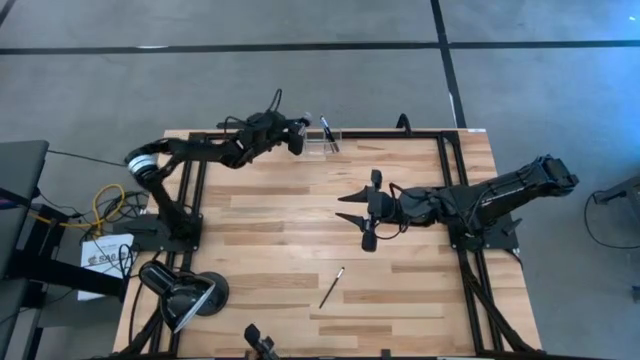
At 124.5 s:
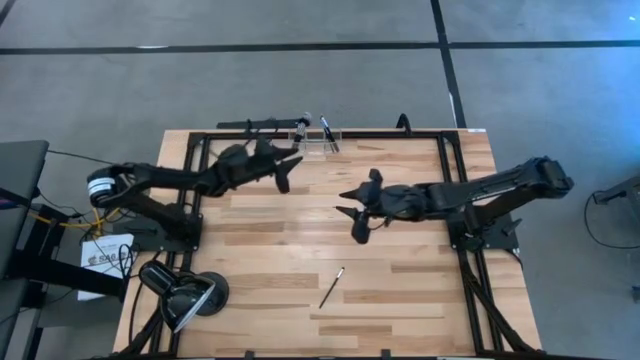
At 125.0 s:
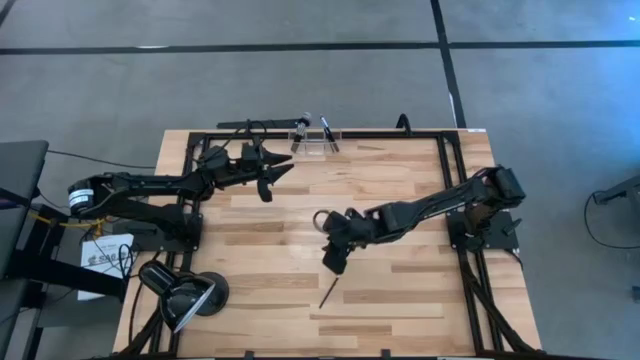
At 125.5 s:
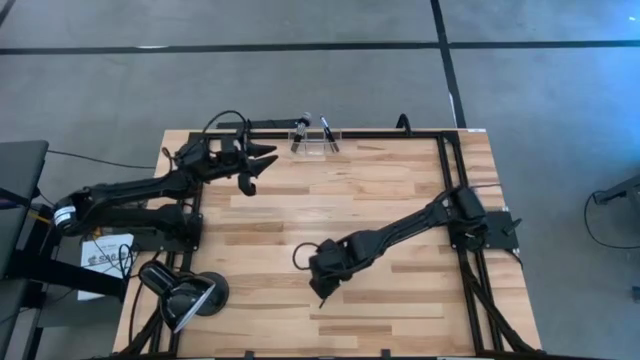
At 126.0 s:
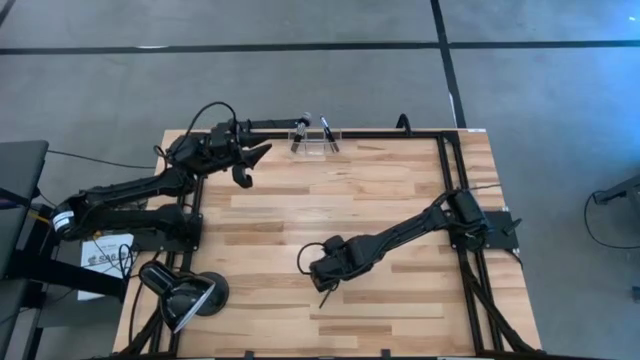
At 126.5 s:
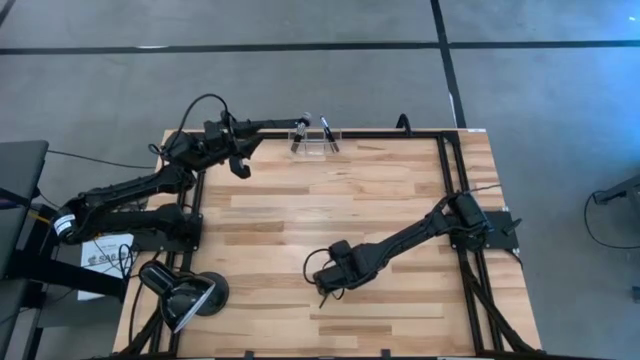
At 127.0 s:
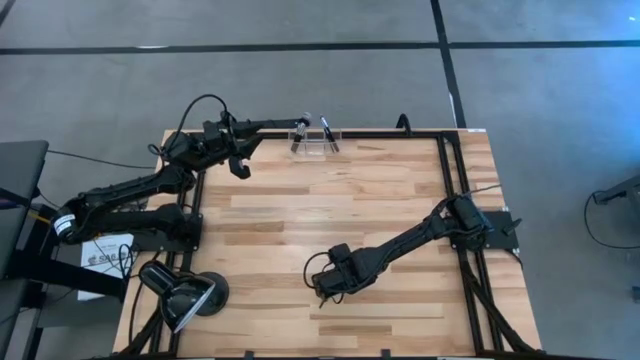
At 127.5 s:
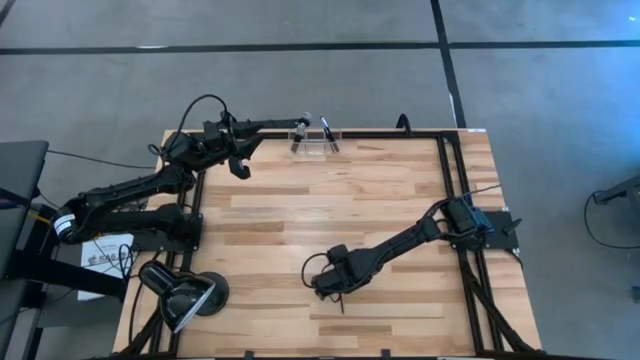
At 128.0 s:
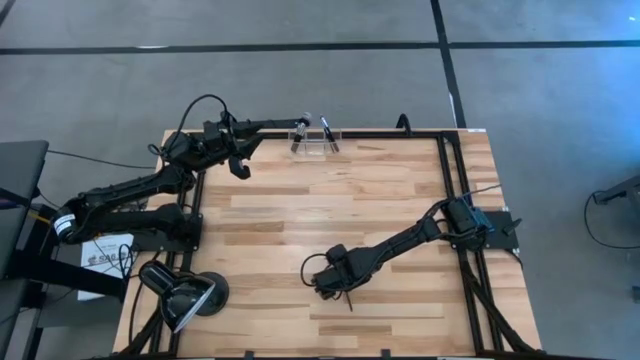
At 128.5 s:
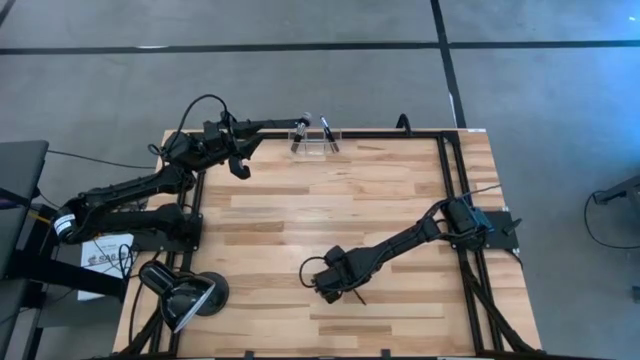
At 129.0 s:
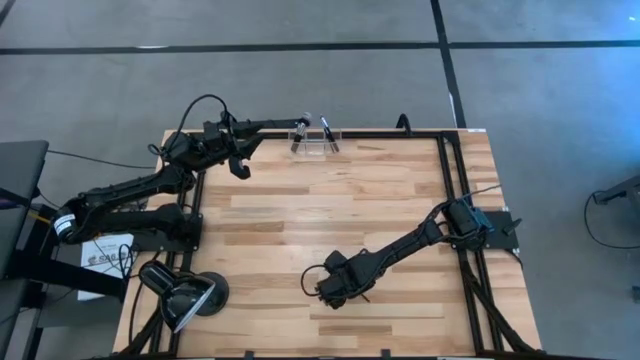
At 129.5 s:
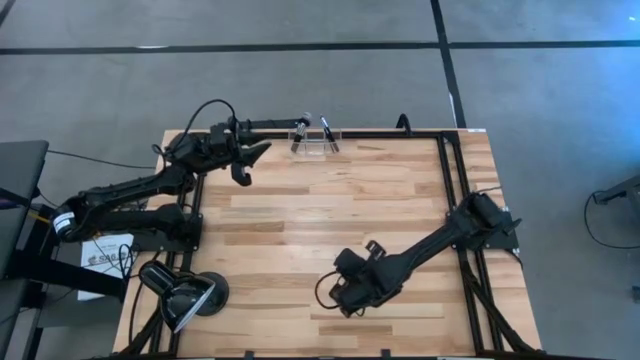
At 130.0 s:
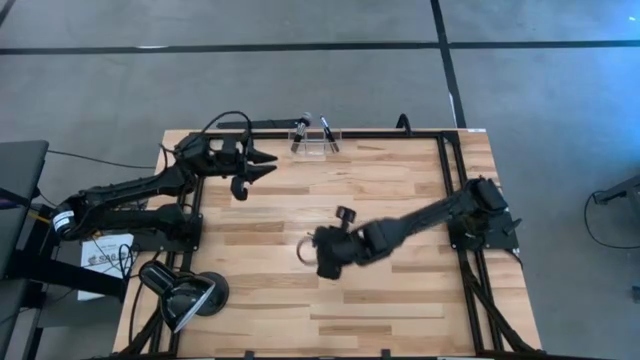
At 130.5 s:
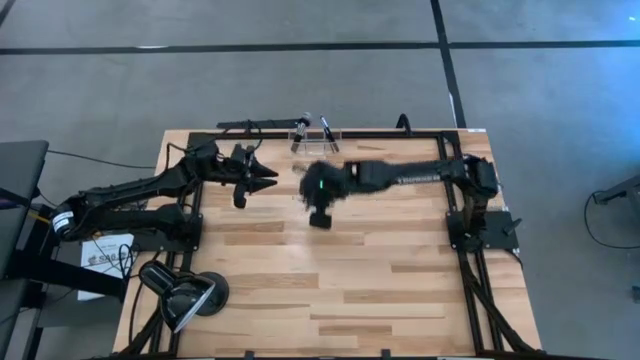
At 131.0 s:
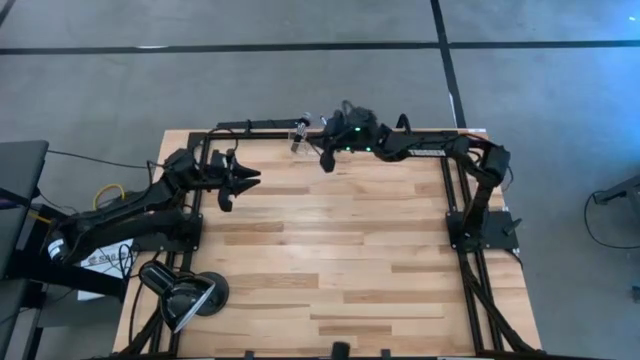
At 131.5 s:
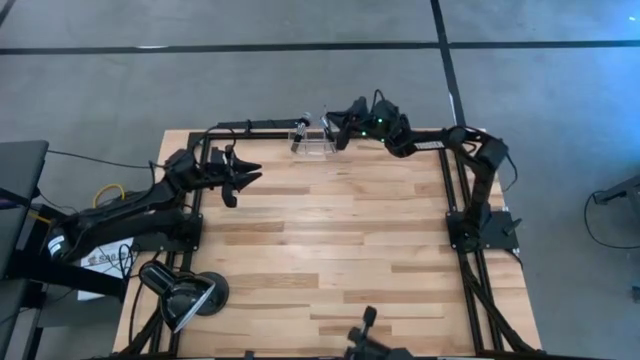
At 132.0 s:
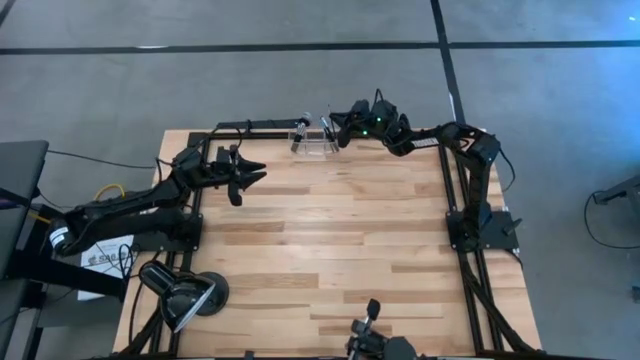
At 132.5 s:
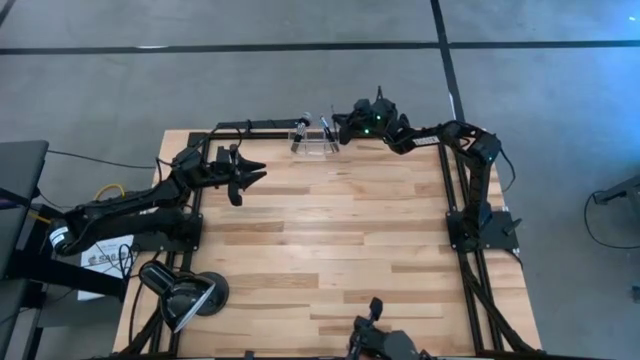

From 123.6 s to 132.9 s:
Task: Sort items
Put the eyeshadow brush into the right section of the transparent organizer

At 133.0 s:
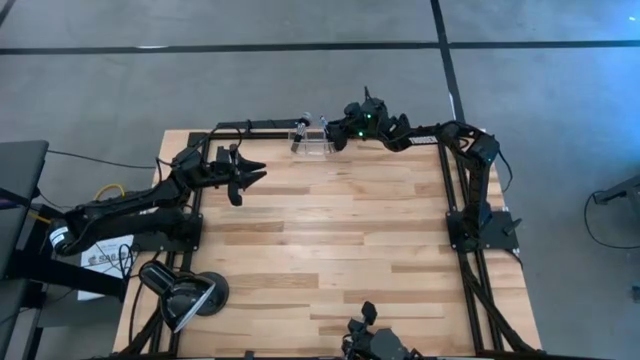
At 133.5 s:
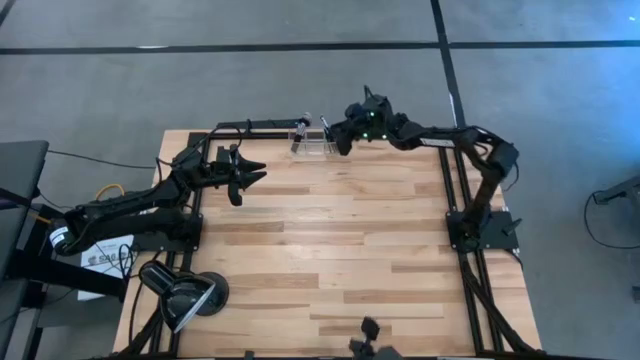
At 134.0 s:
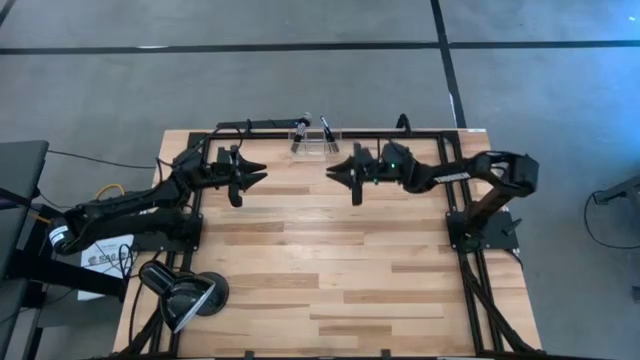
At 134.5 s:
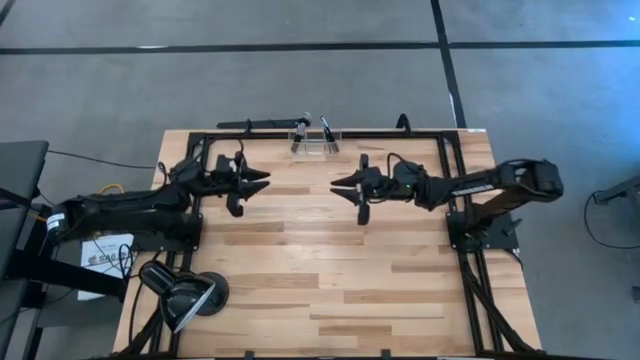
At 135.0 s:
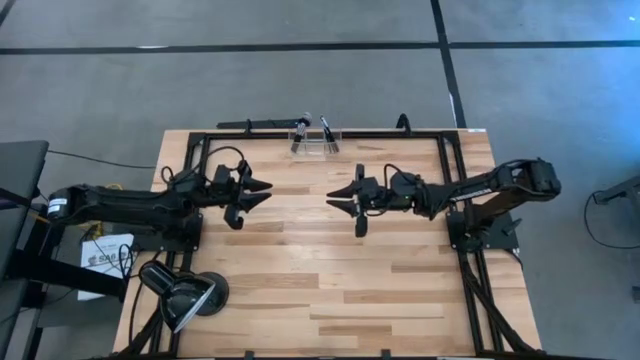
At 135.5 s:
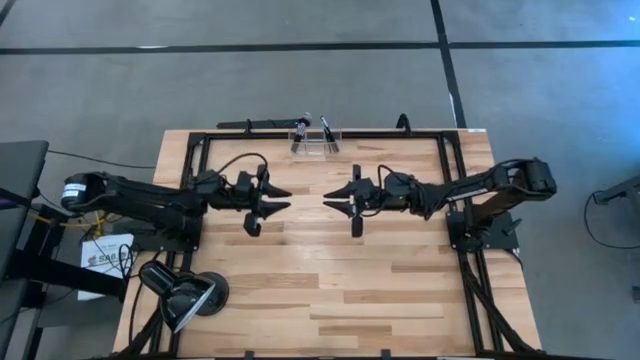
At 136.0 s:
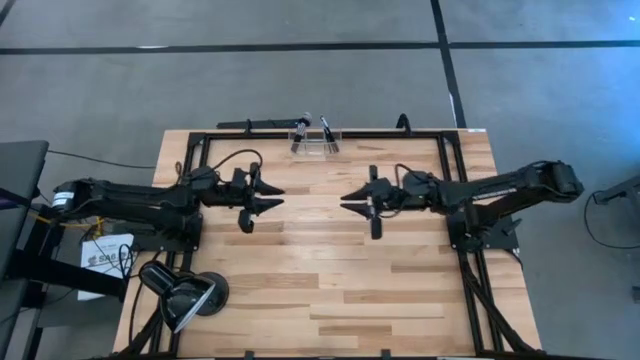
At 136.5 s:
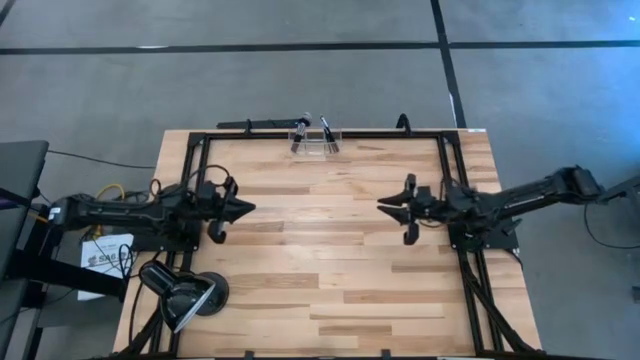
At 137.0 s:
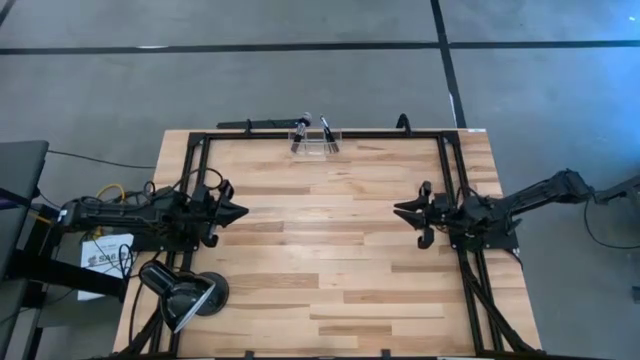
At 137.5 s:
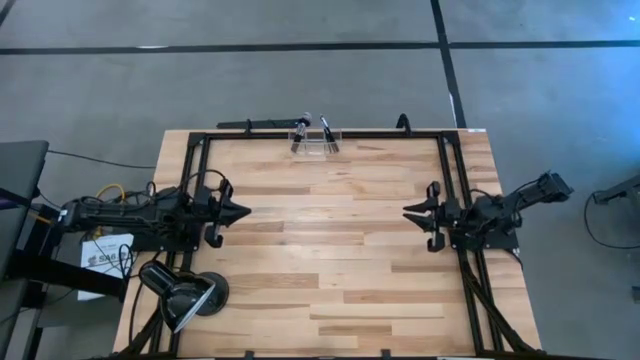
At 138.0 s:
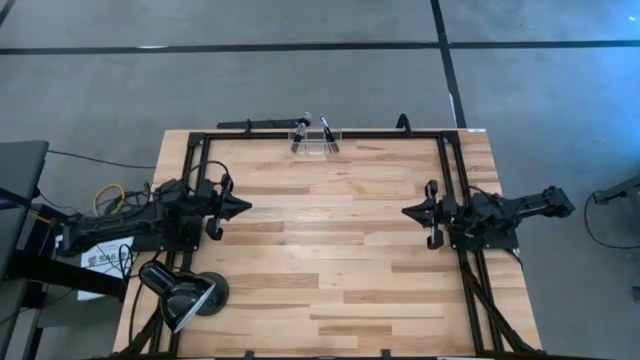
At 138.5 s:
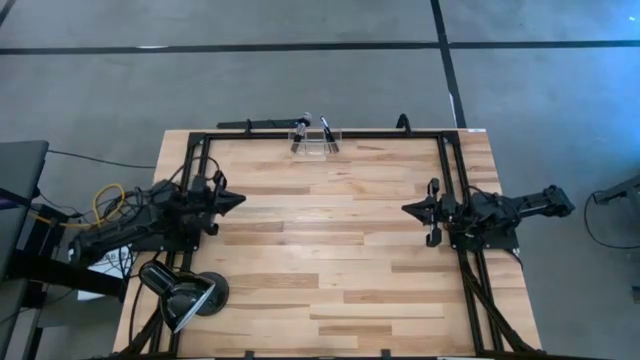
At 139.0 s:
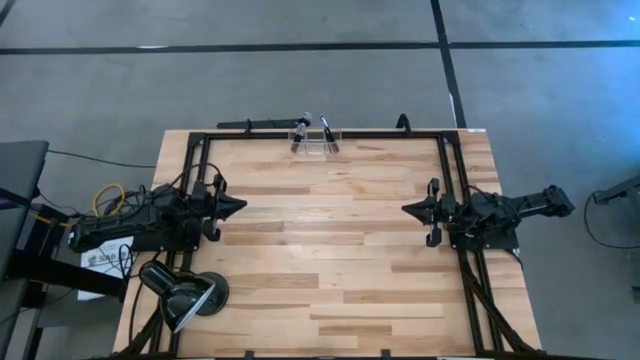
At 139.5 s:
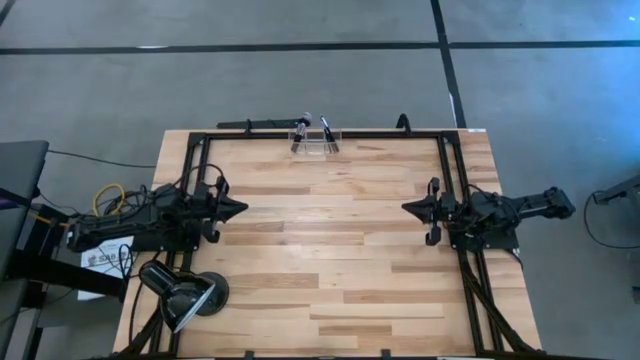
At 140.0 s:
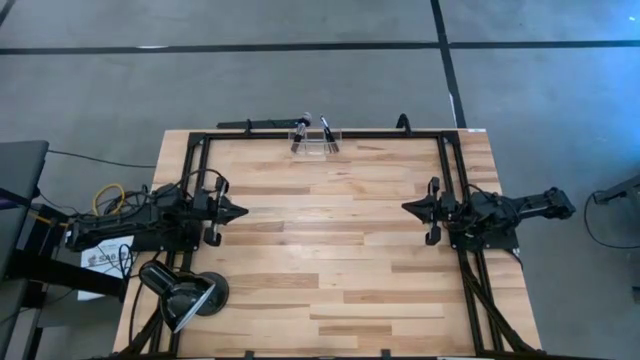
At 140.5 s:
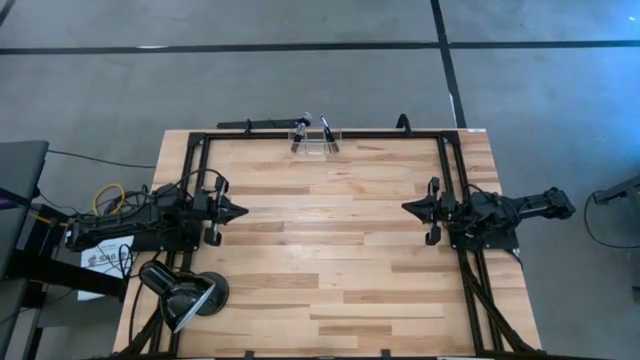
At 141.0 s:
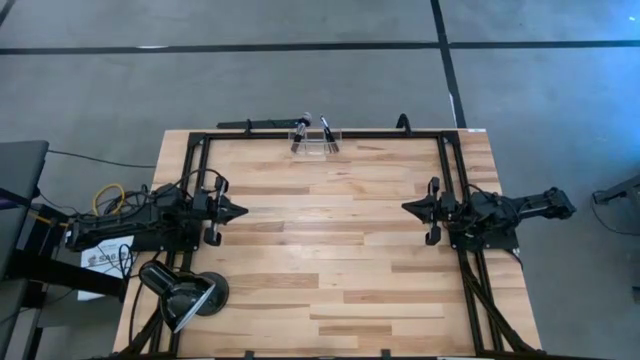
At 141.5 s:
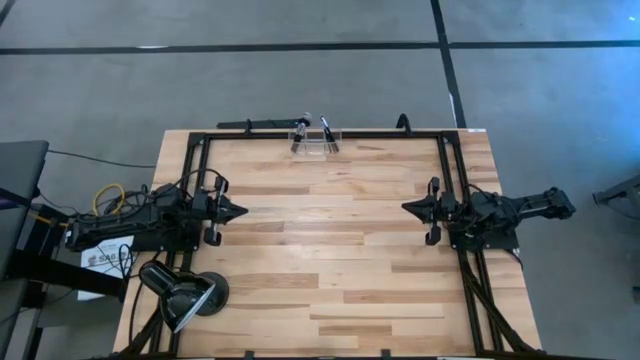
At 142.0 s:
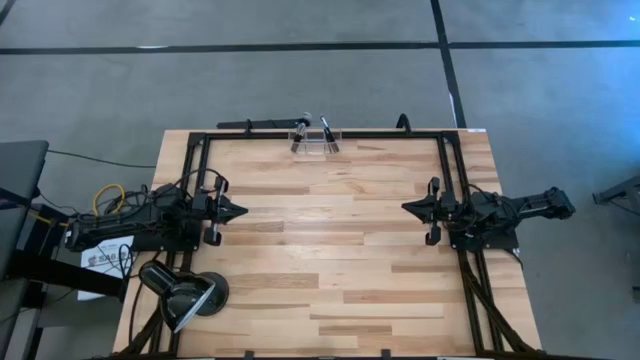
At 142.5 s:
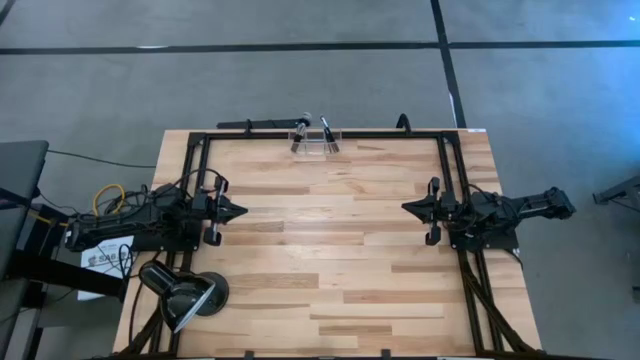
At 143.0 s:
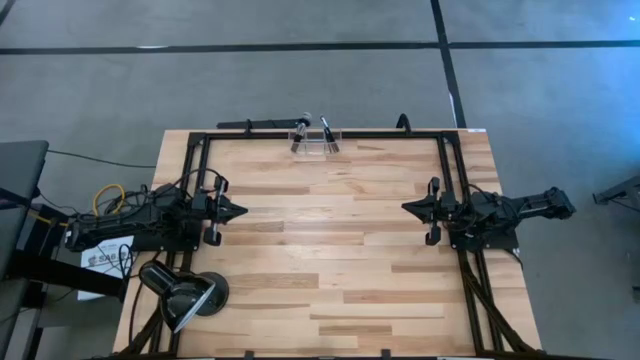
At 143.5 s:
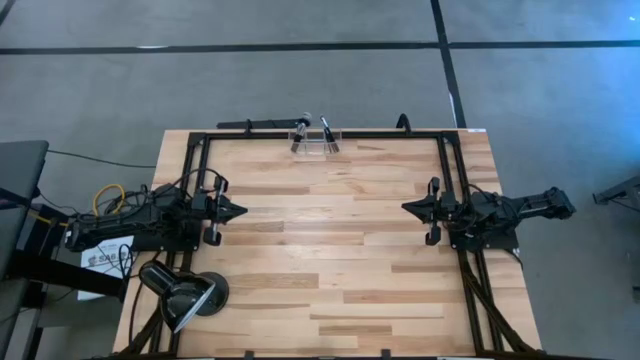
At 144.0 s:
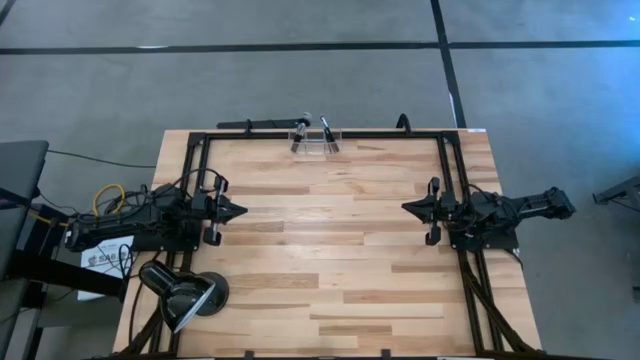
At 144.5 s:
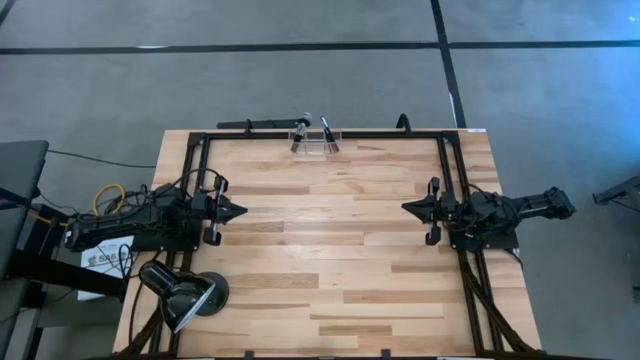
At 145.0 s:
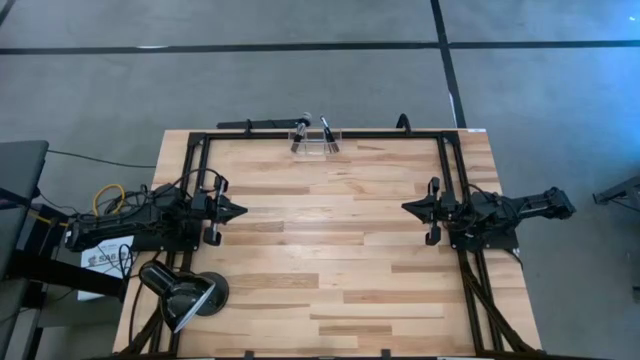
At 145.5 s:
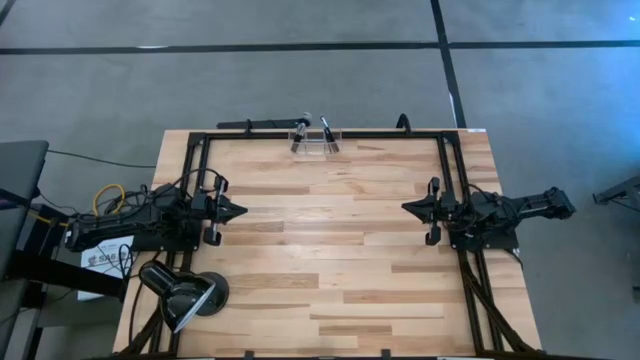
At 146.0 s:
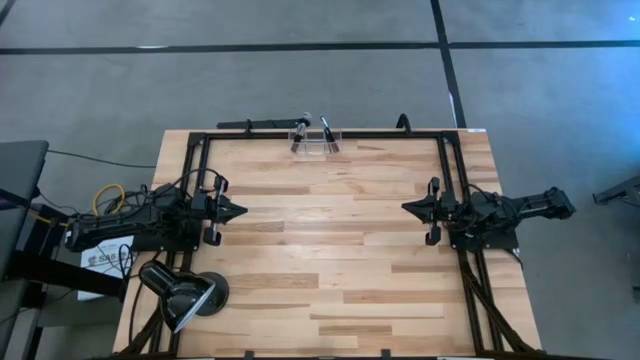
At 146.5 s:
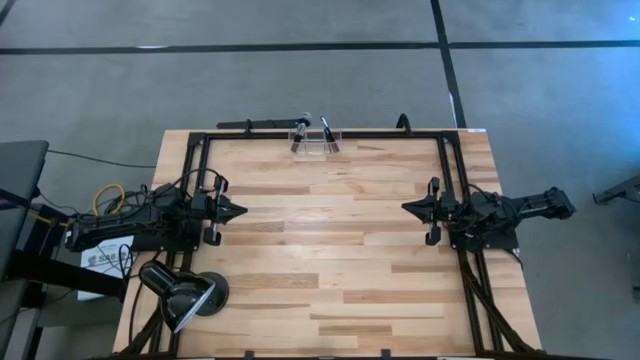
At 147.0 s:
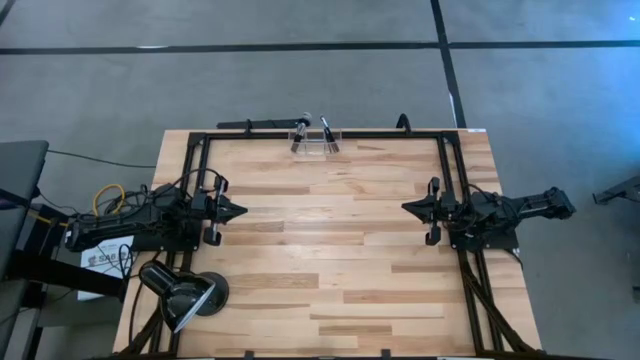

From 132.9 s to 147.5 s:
Return to Home Position
